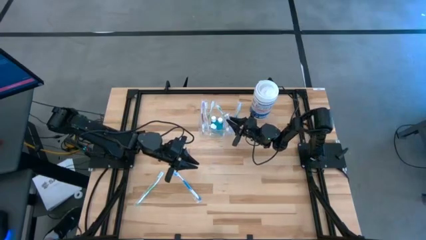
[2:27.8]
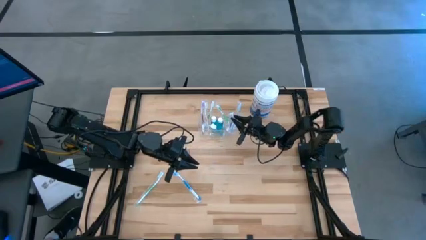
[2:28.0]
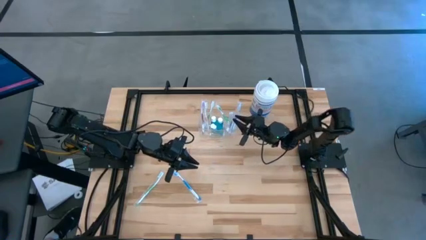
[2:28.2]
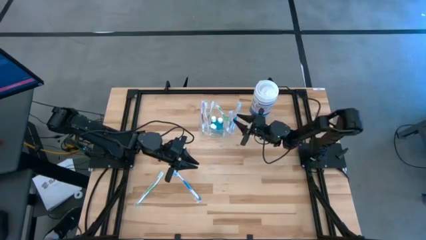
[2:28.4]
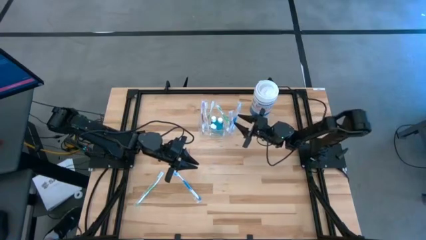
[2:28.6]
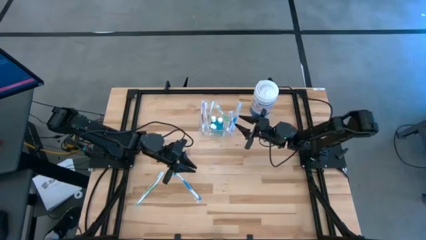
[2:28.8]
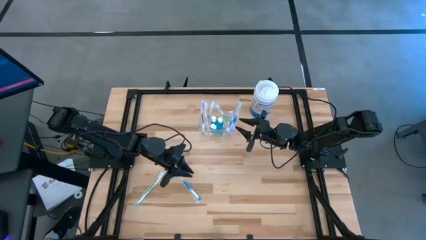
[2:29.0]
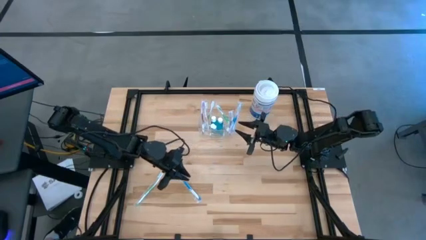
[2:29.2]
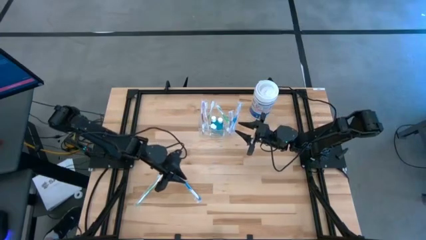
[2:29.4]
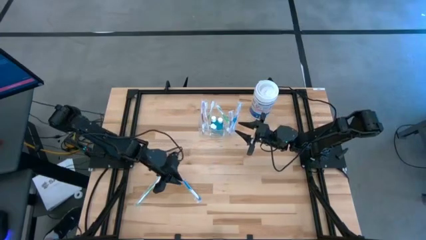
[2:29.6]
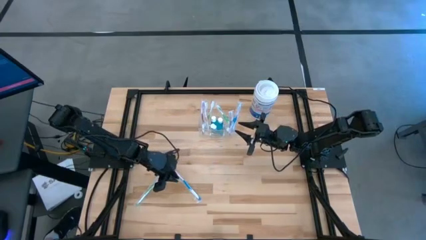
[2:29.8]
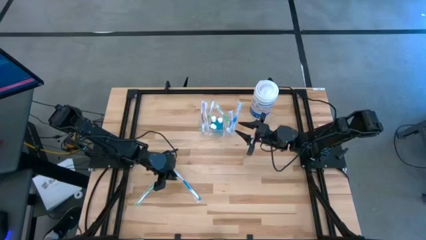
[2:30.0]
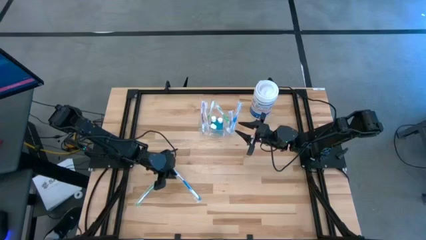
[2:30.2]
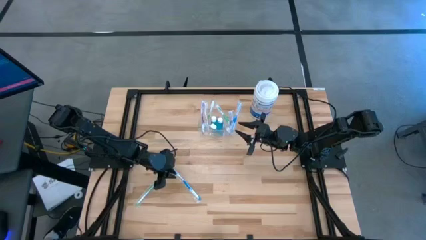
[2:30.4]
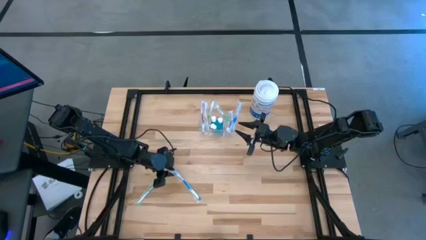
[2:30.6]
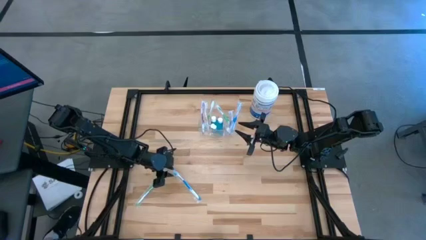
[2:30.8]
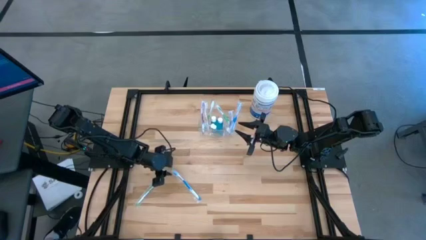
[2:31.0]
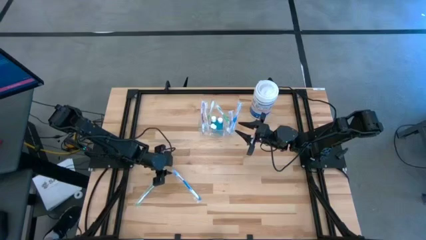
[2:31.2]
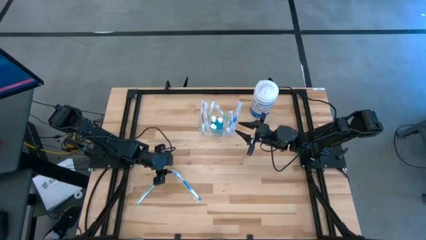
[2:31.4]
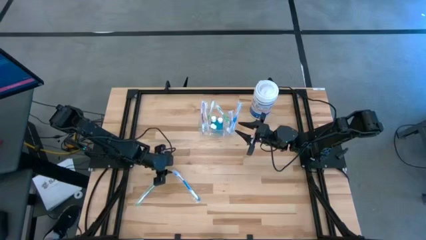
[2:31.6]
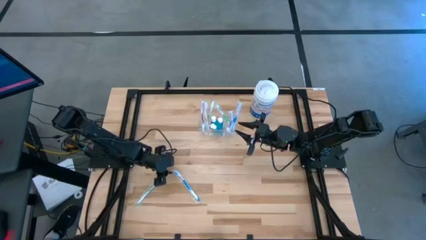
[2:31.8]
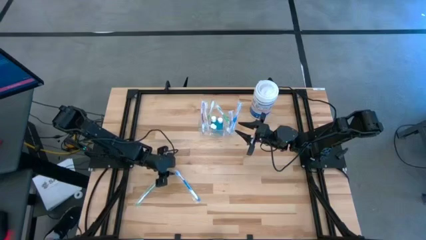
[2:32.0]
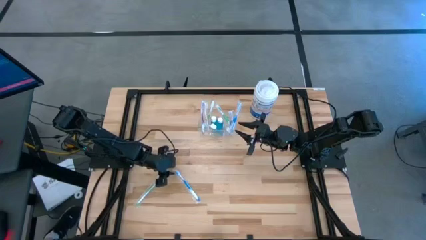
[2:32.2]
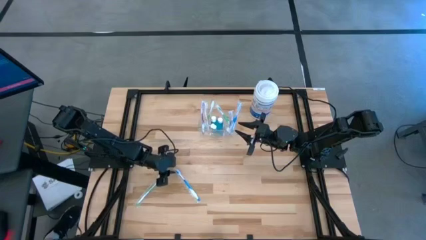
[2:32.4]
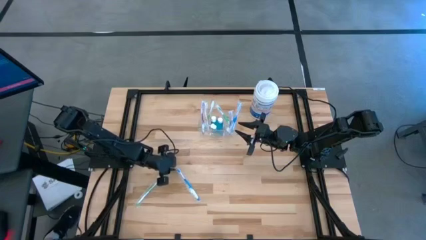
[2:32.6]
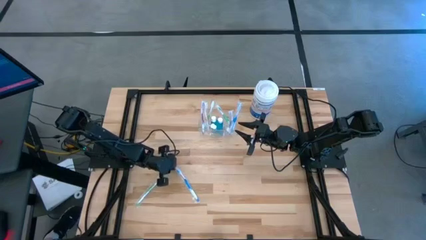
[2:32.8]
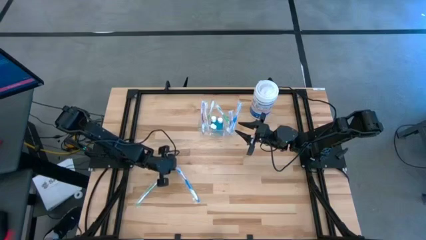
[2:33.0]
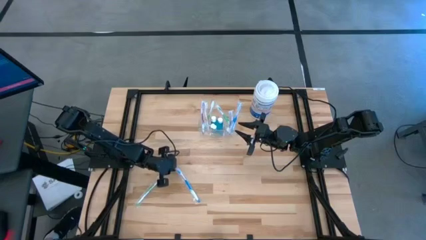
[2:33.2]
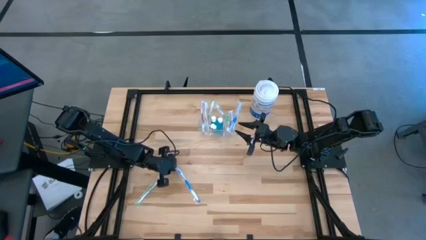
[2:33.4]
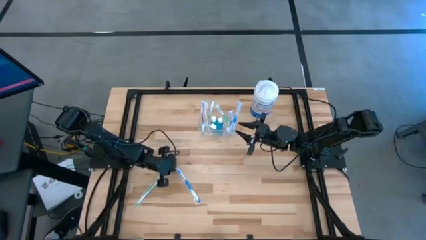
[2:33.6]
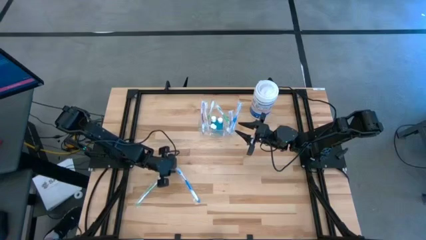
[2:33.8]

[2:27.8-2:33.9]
Task: Pick & Place toothbrushing station
Put the blue toothbrush into the transparent organizer

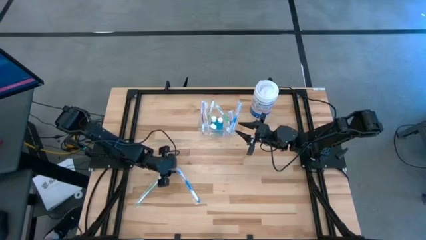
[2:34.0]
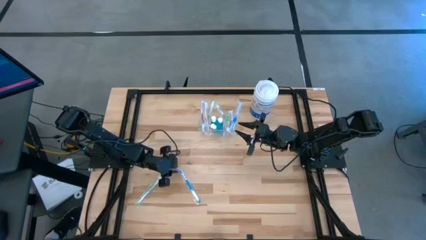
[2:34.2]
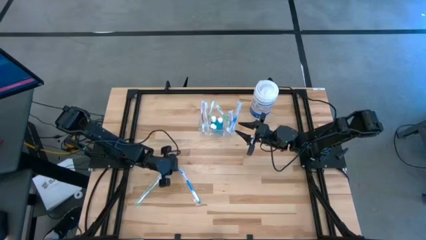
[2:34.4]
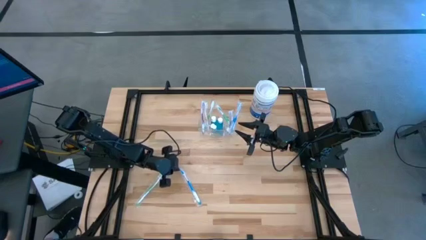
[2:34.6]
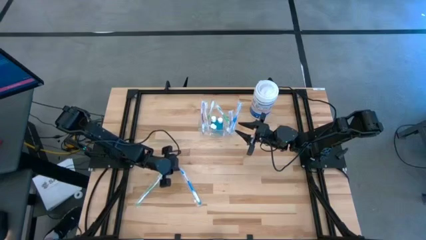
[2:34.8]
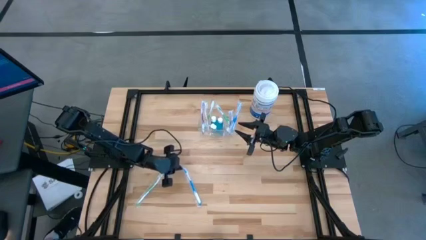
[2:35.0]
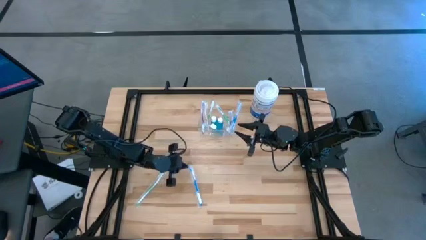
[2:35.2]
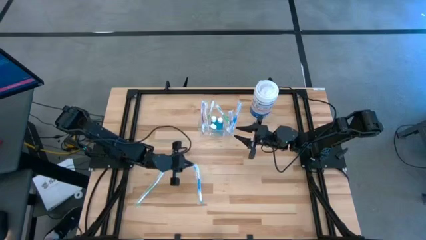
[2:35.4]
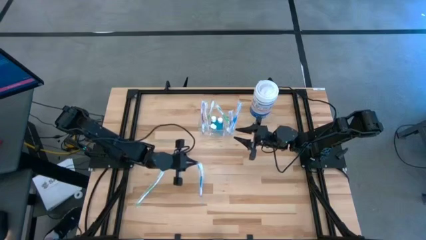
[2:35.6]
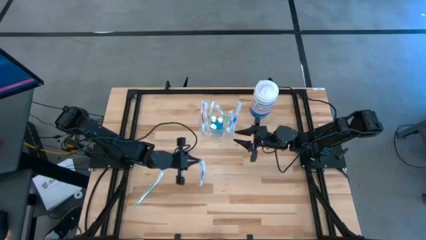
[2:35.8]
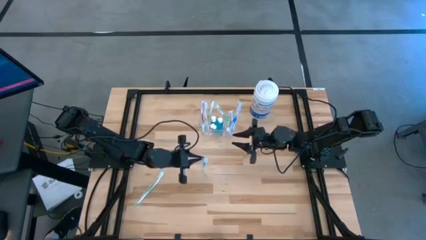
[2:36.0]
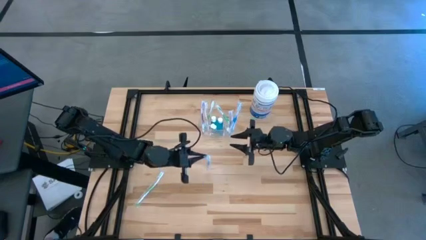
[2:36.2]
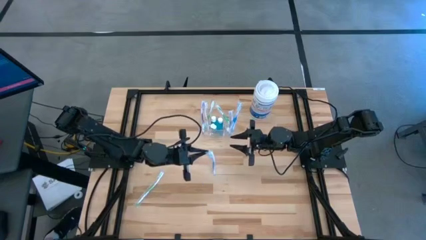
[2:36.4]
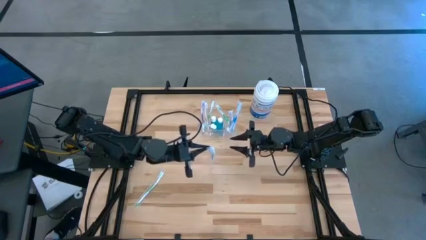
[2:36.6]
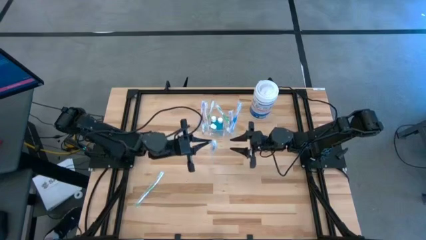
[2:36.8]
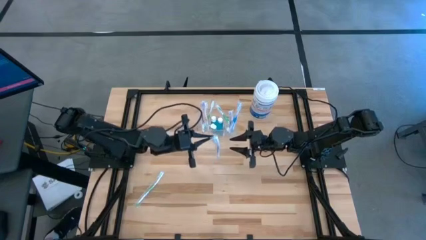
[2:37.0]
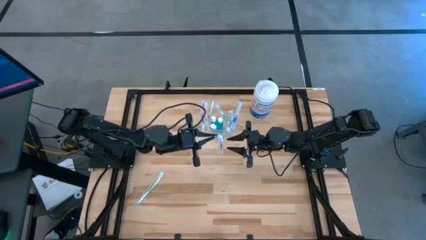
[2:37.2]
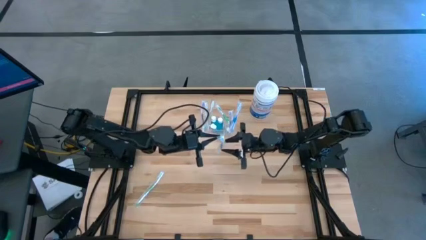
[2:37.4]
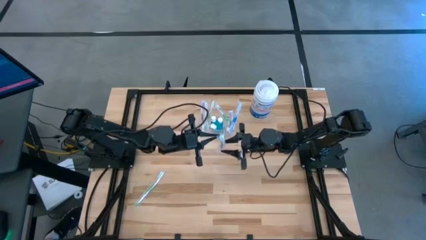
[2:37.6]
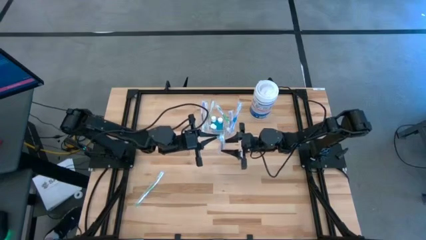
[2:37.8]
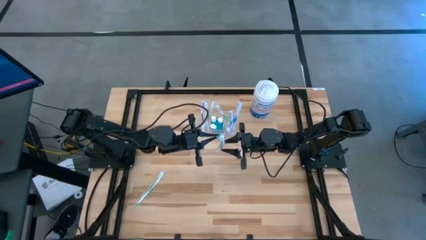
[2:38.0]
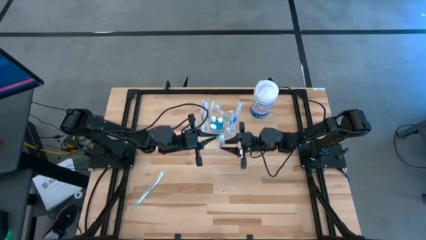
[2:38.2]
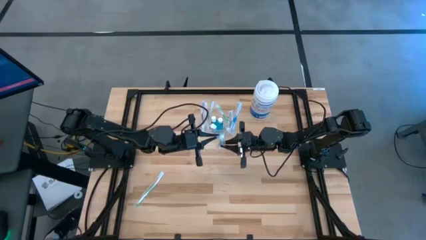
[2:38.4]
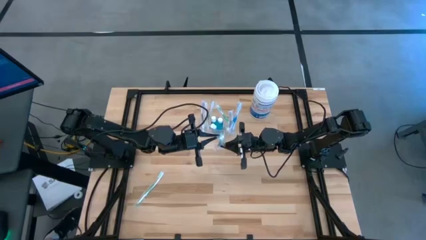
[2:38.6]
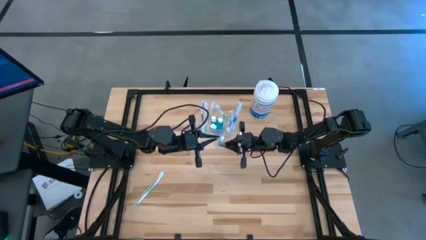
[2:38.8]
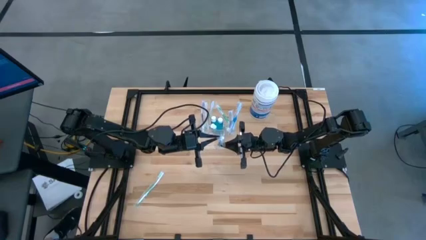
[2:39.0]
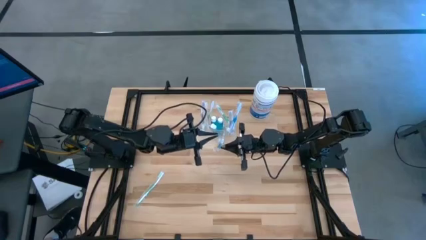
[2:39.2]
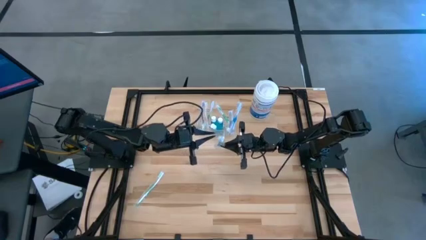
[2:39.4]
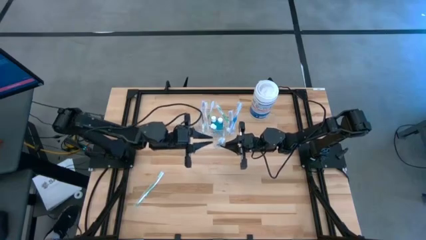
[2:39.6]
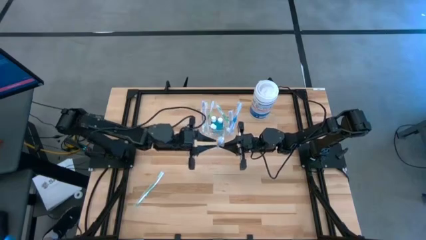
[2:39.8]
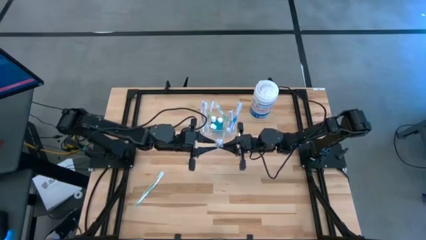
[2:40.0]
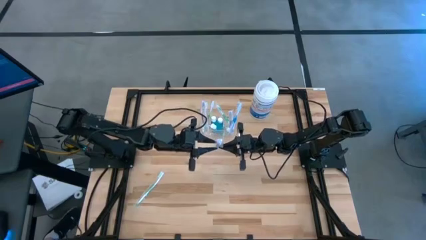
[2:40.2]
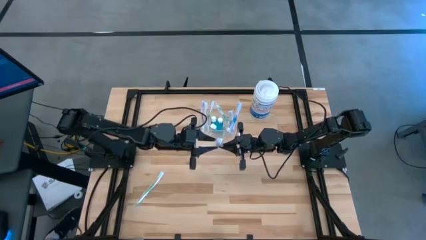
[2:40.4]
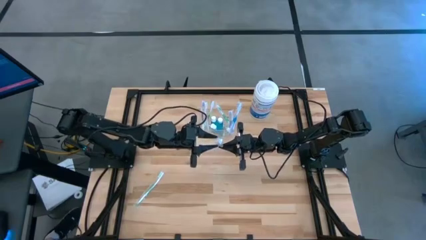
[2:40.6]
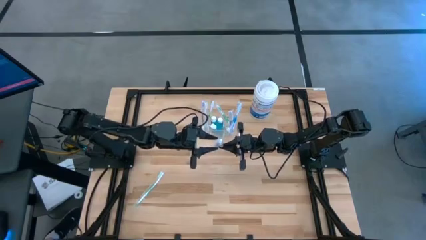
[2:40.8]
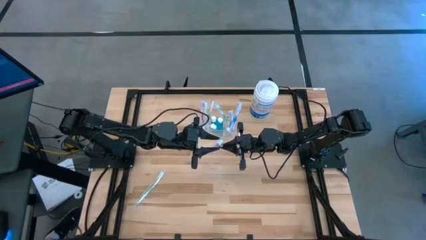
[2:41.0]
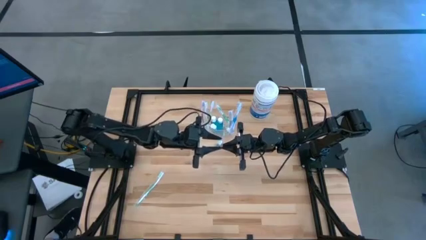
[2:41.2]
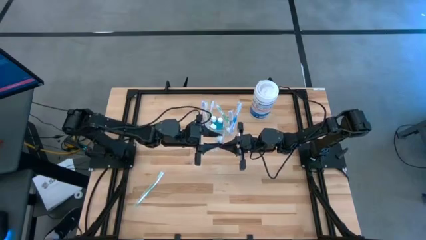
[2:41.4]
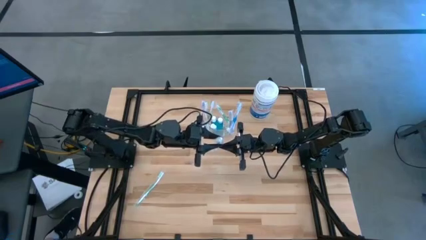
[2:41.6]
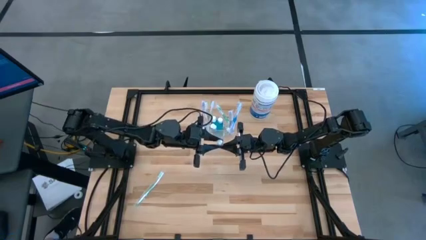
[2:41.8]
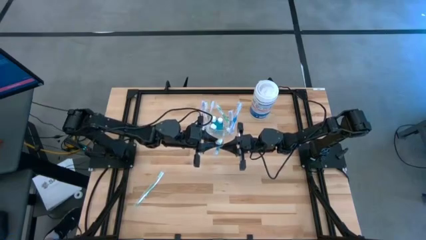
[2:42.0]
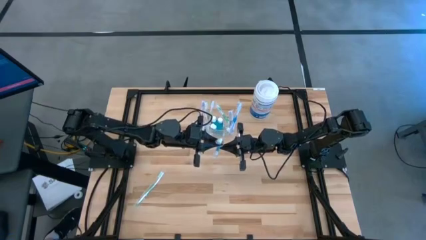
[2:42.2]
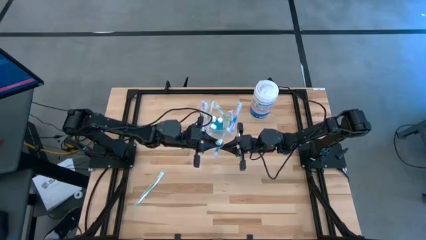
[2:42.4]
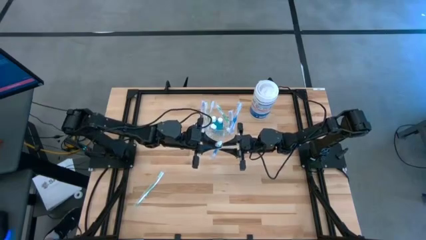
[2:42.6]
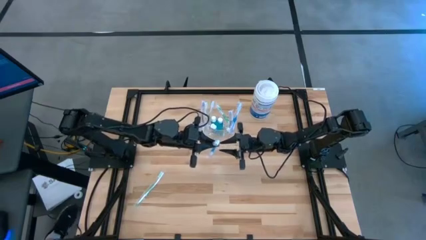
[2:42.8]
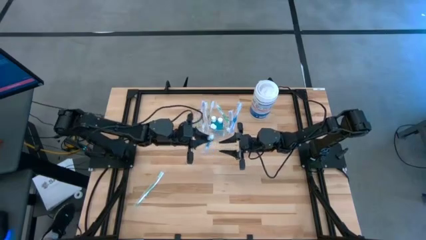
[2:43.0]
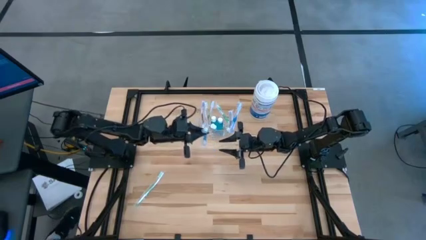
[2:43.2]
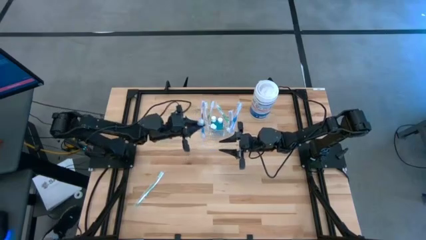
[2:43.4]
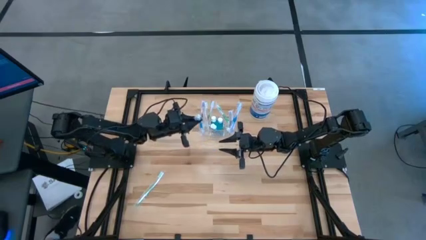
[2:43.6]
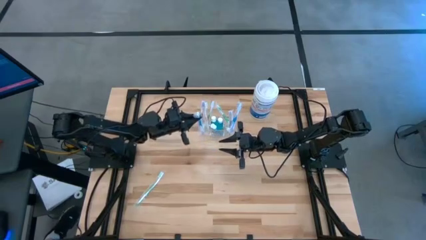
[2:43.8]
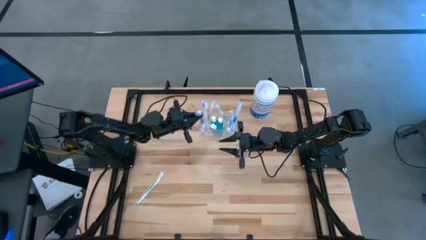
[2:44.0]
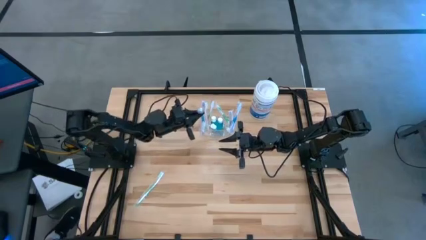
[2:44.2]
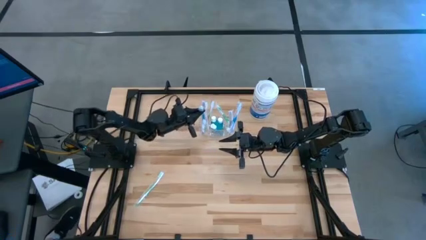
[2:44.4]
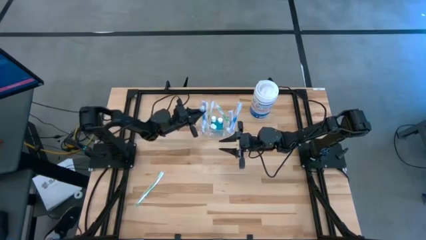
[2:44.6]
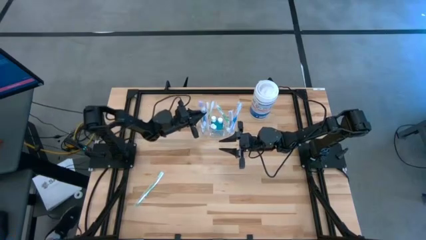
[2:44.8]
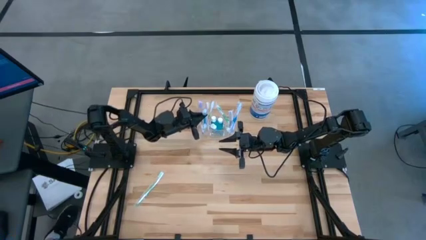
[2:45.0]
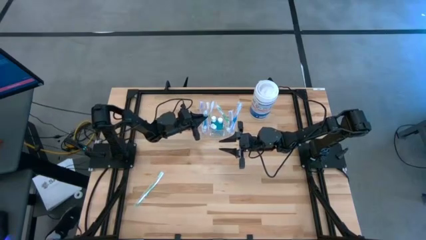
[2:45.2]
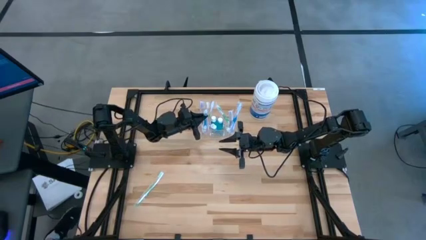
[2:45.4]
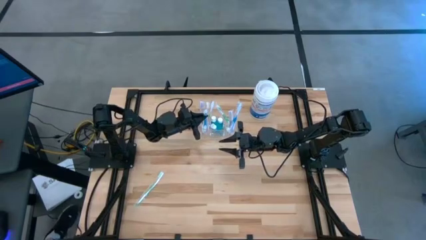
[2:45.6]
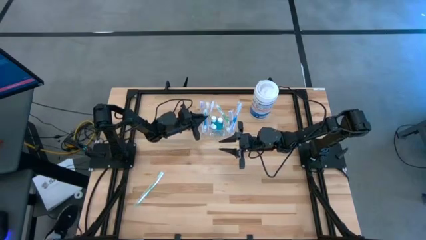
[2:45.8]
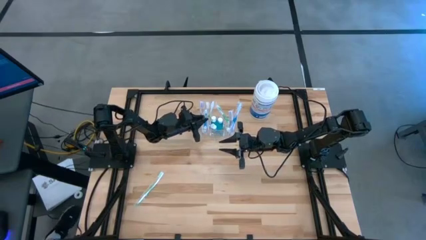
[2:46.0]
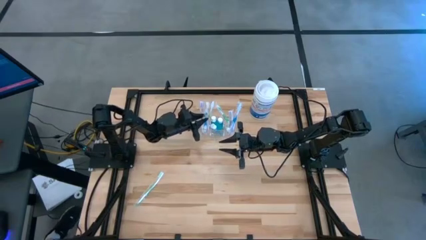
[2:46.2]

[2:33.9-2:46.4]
Put the blue toothbrush into the transparent organizer
